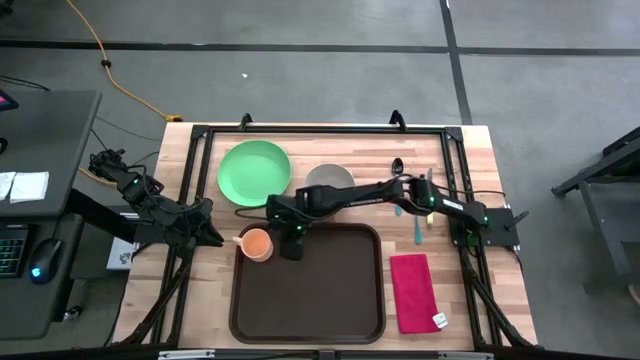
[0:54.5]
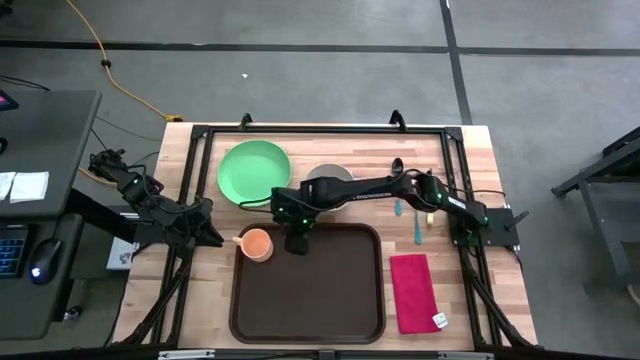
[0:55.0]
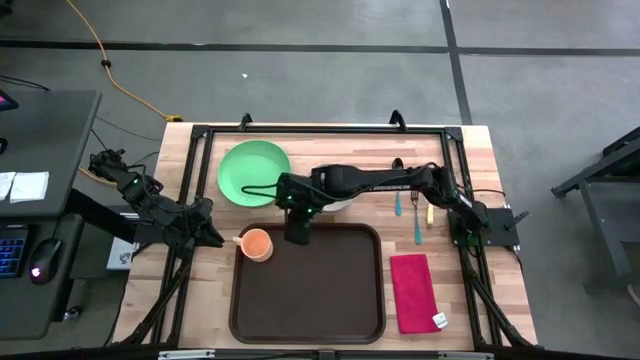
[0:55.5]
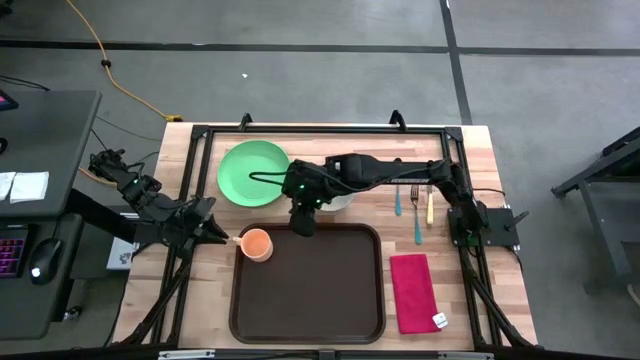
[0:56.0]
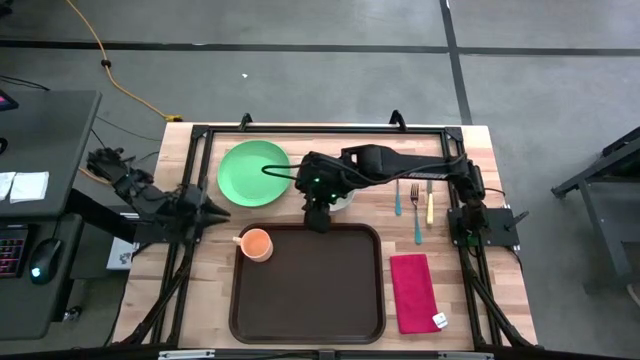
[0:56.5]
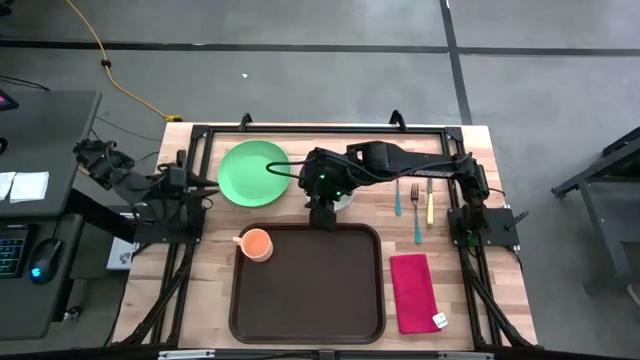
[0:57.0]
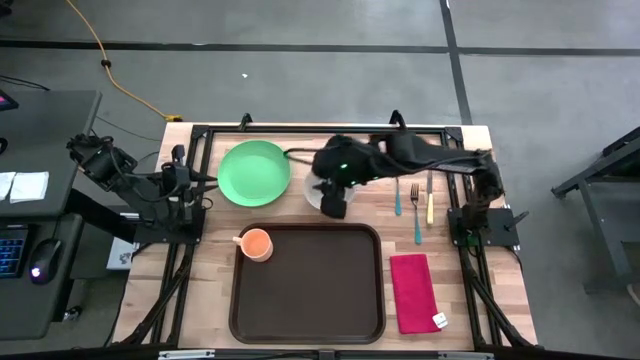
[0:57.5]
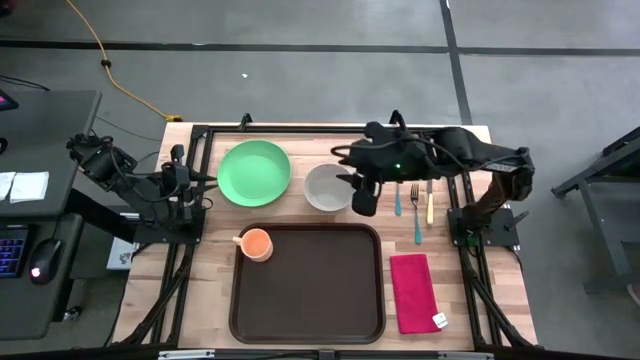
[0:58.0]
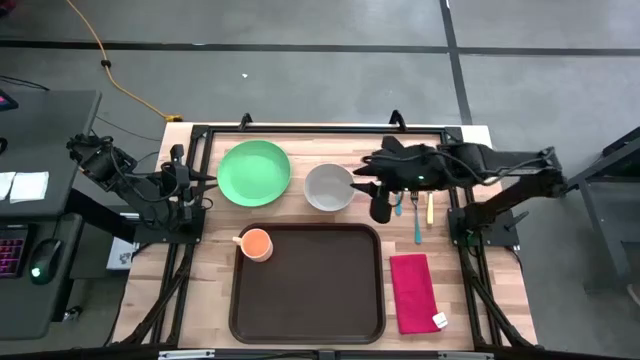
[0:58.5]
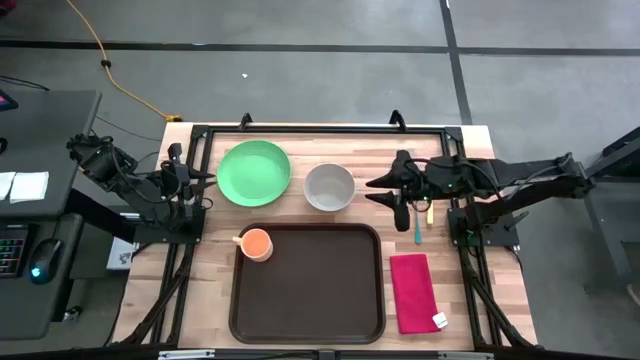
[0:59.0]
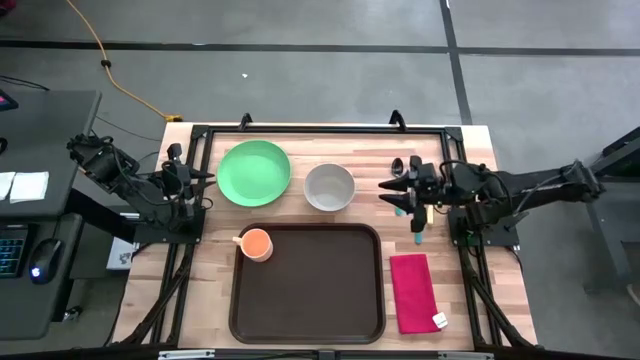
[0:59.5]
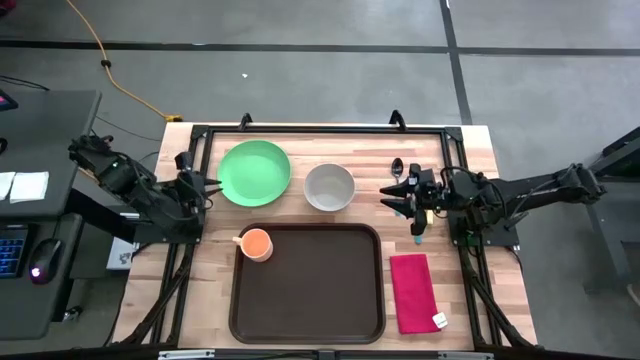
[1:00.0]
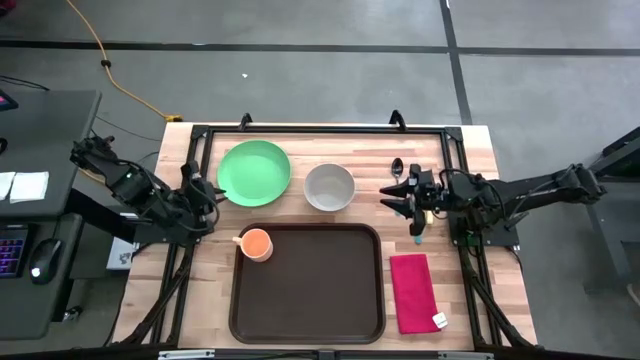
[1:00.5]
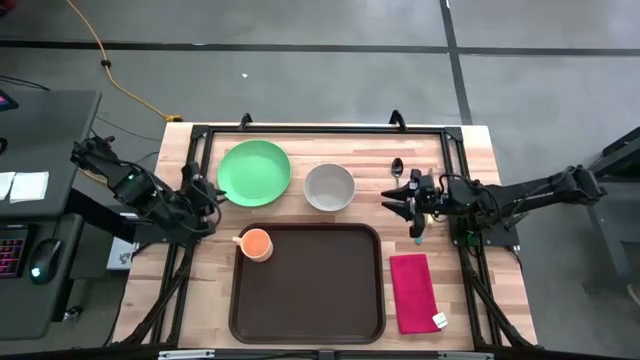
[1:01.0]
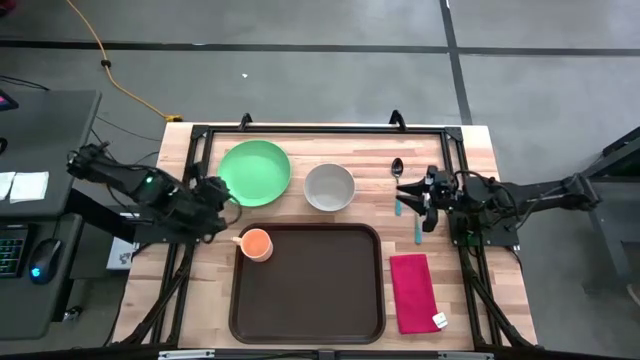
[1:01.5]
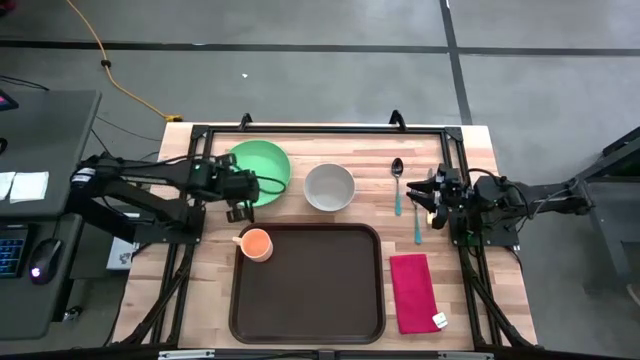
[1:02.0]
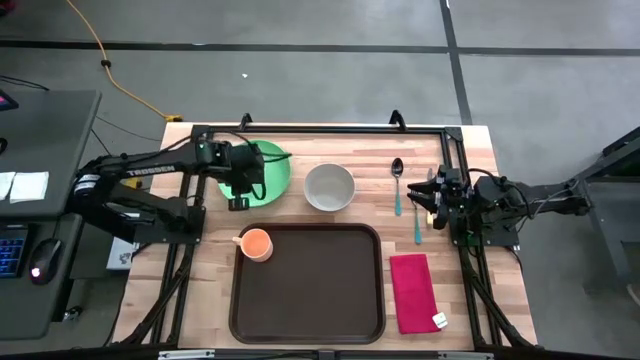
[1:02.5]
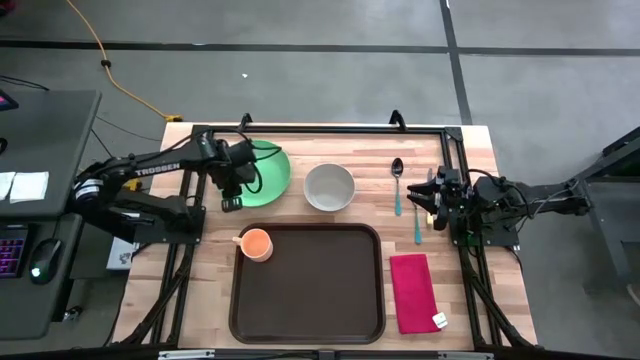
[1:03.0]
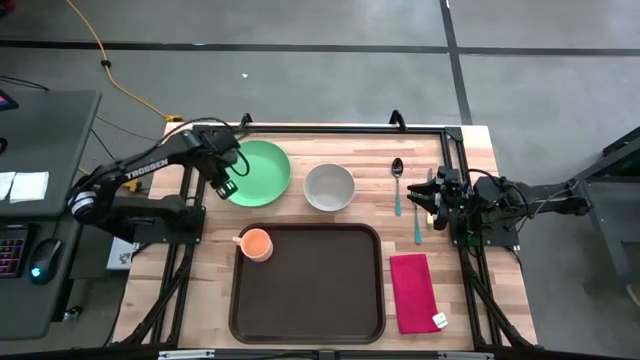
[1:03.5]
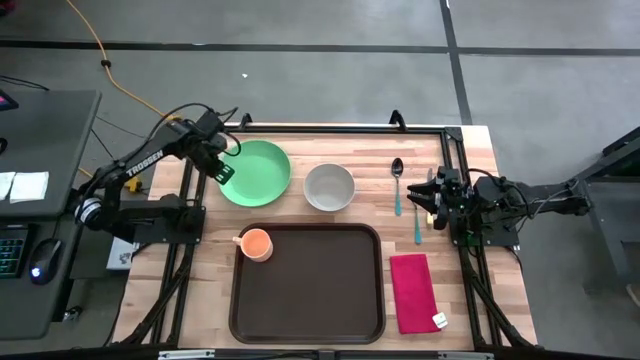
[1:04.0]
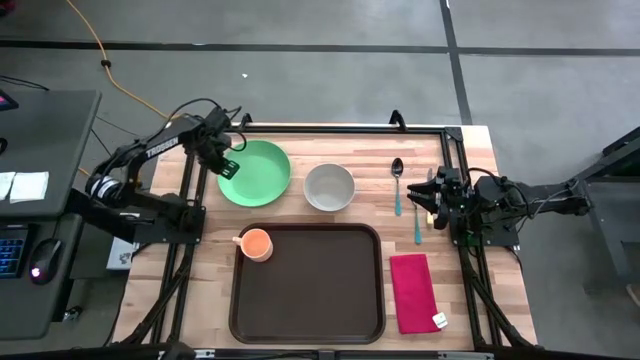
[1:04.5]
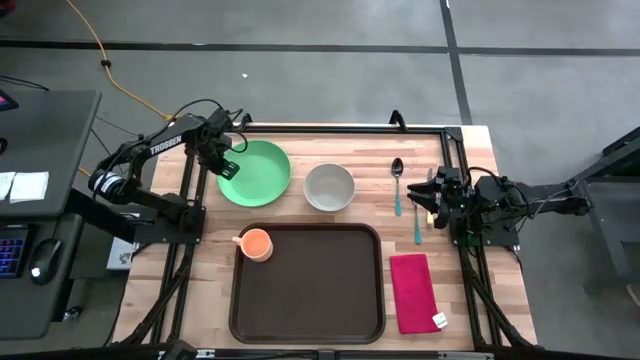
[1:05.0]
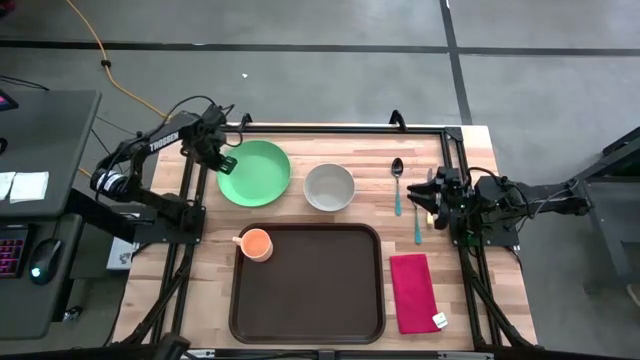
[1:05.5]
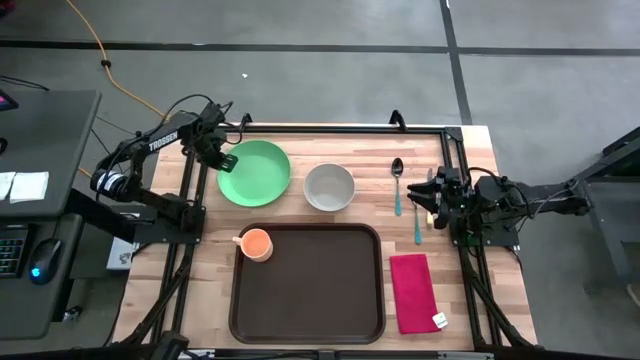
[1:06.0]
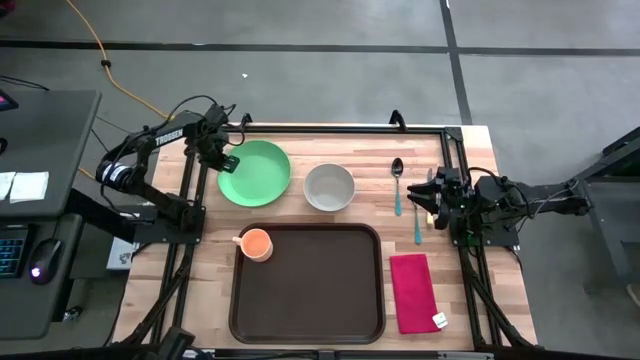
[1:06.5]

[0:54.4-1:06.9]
Task: Set up tray
Put the green plate in the center of the brown tray

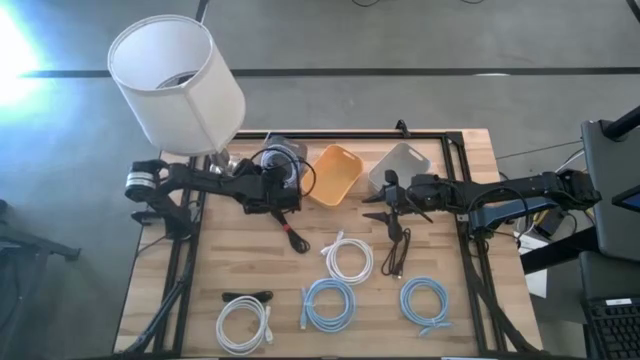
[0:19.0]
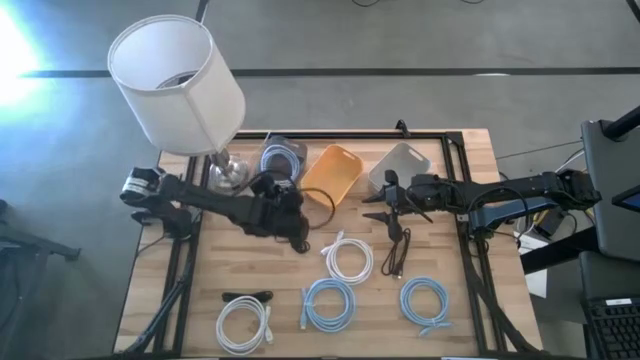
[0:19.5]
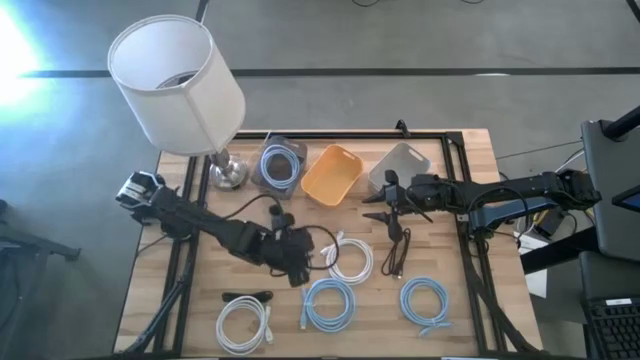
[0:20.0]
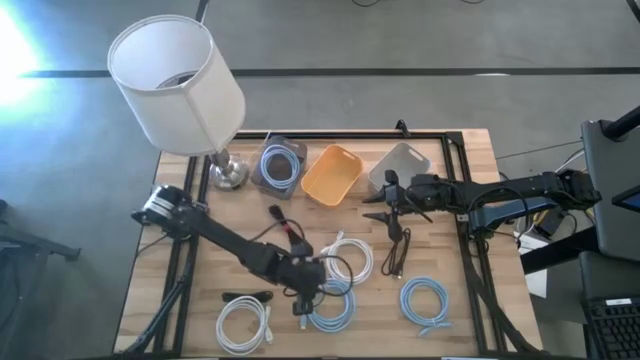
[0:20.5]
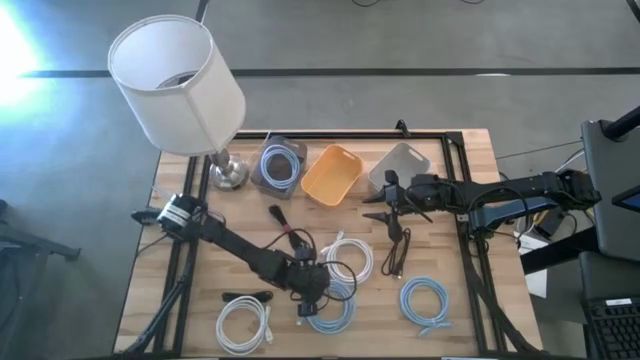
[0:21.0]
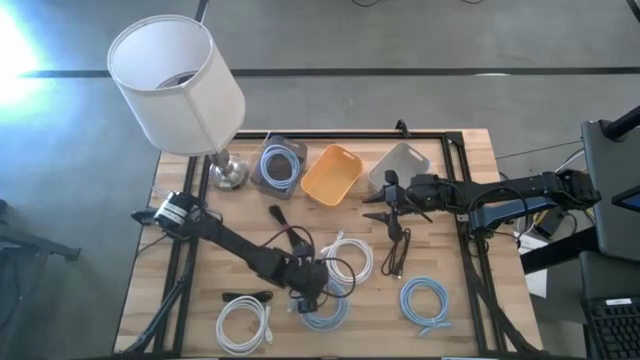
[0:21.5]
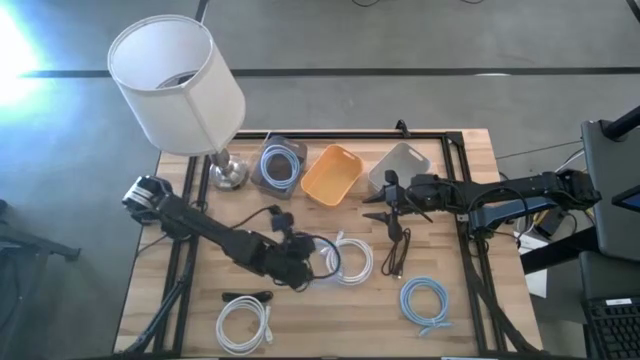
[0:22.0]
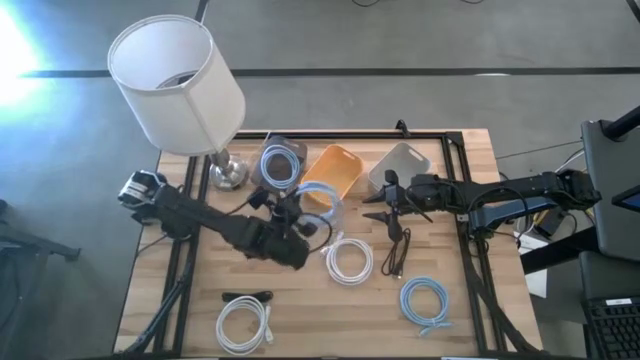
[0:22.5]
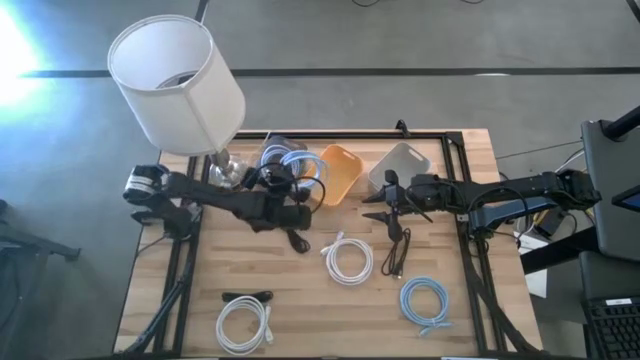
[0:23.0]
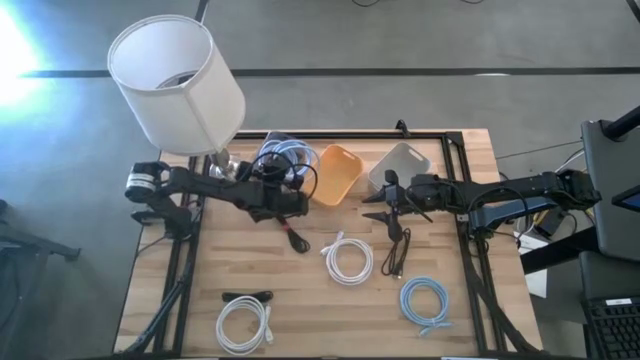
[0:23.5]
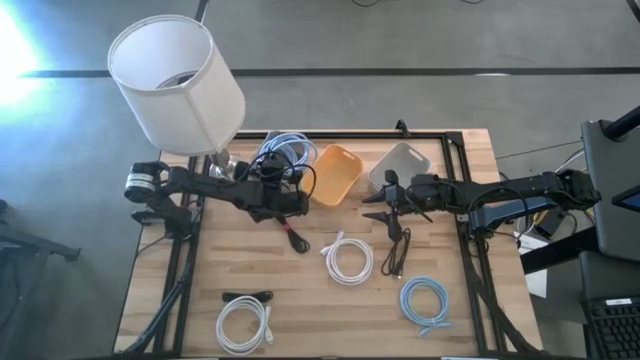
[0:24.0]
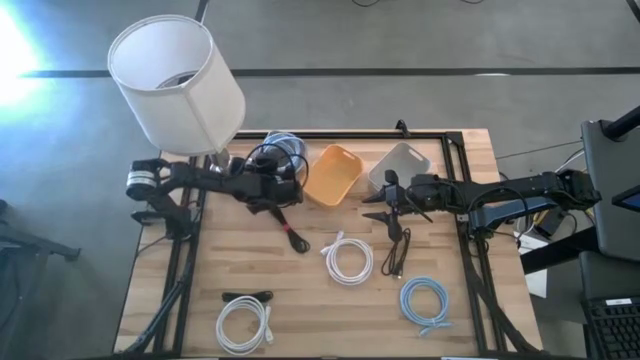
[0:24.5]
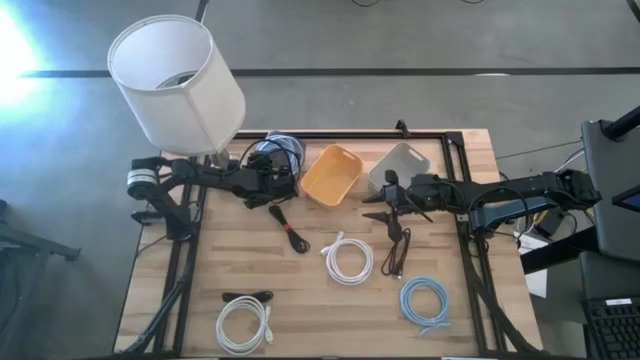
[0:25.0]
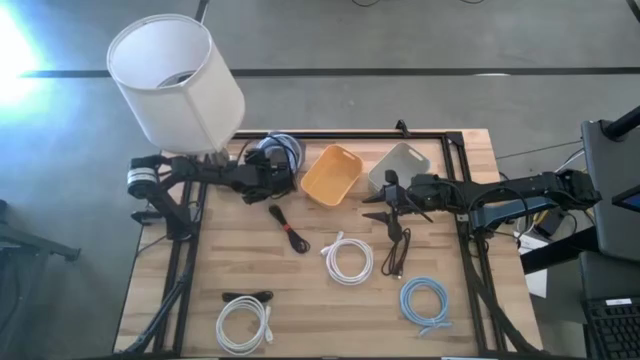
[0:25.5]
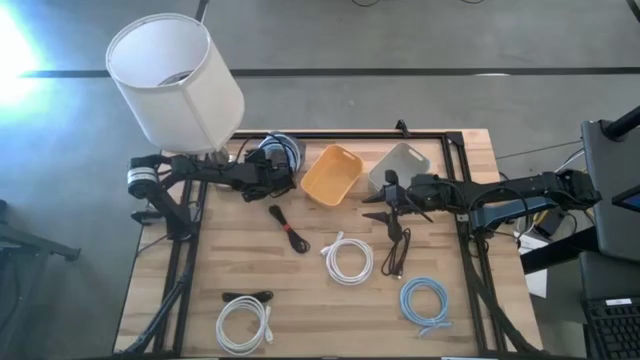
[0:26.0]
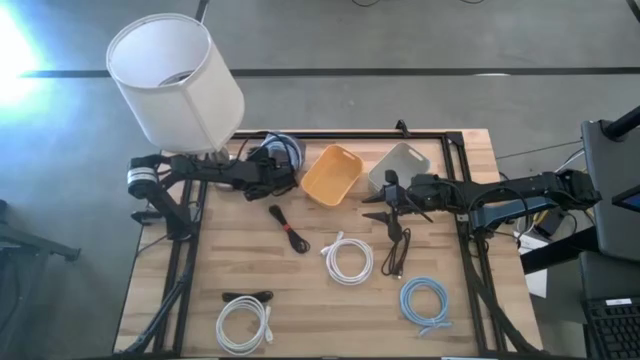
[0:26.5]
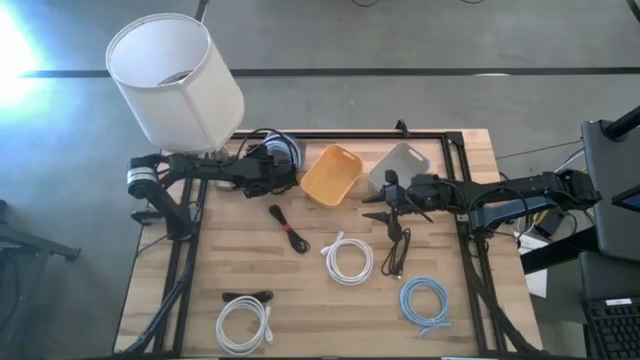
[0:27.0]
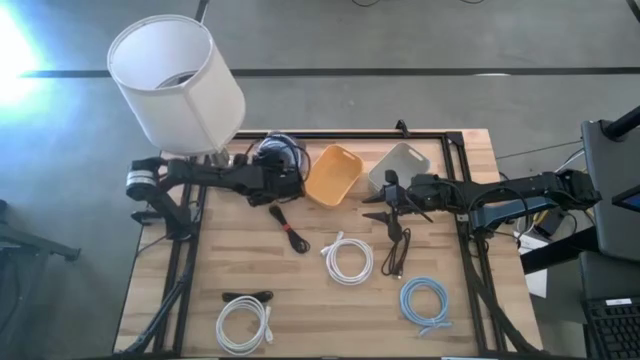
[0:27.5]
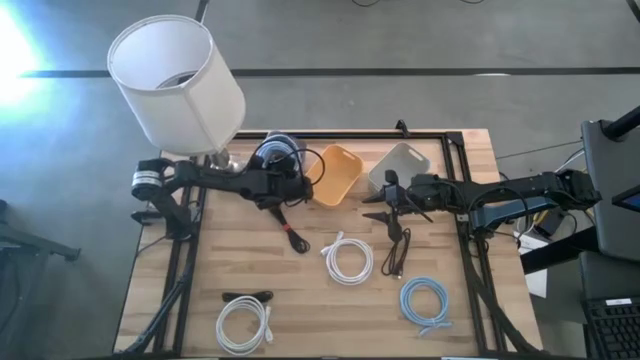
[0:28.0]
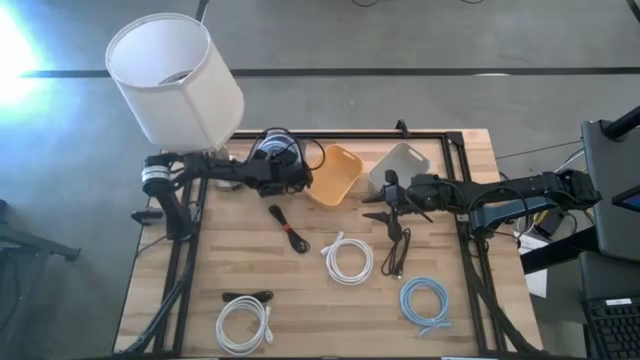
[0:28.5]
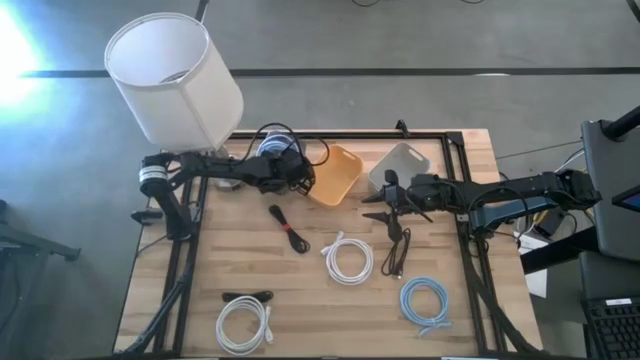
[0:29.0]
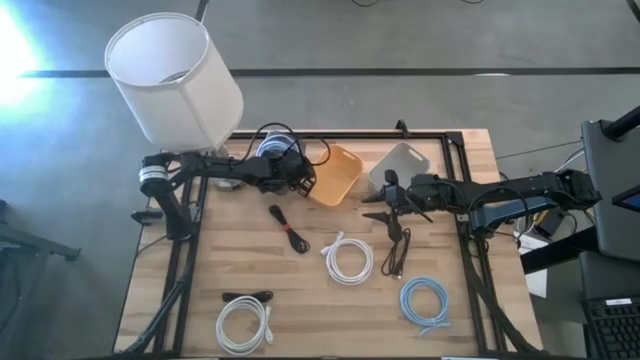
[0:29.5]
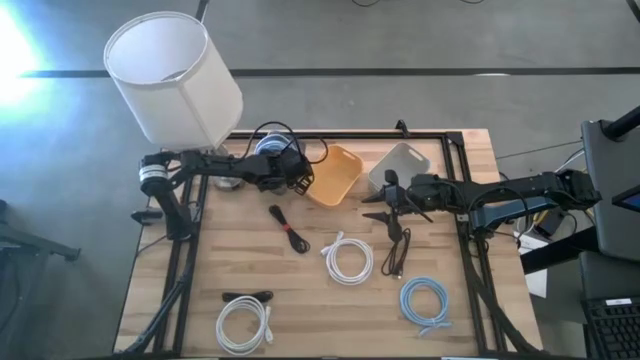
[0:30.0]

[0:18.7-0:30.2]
Task: Pick & Place USB Port
Put the left blue HDMI cable into the black bin
